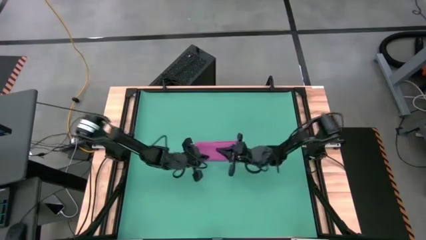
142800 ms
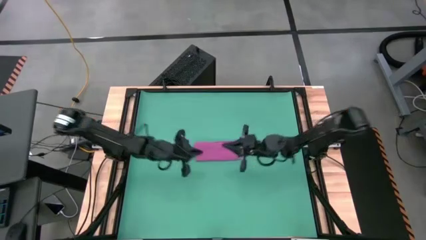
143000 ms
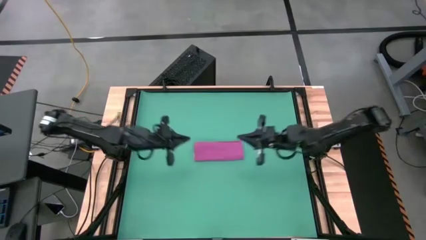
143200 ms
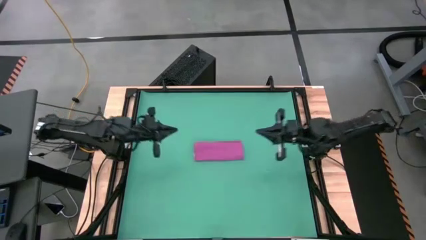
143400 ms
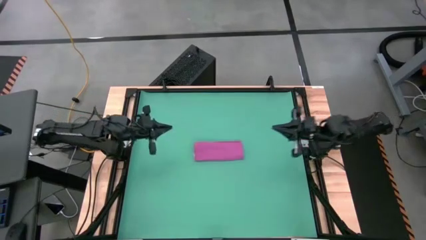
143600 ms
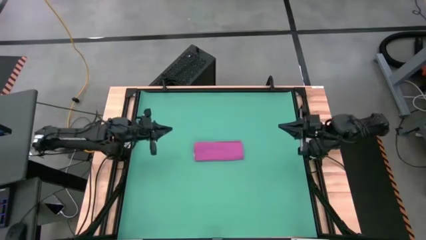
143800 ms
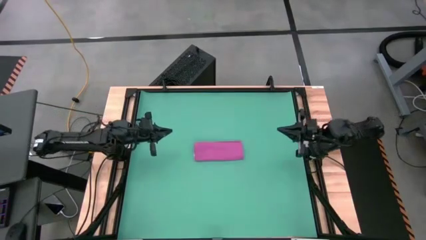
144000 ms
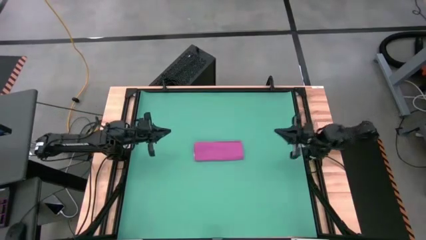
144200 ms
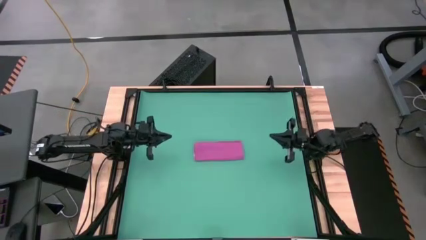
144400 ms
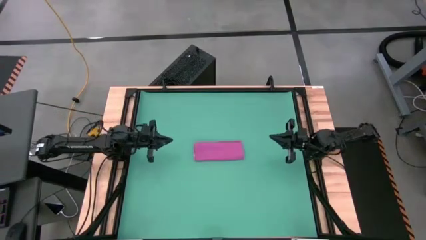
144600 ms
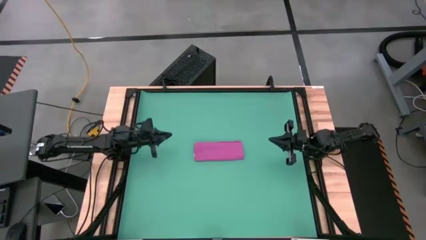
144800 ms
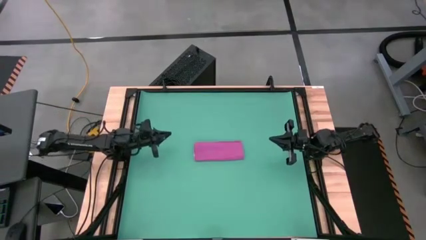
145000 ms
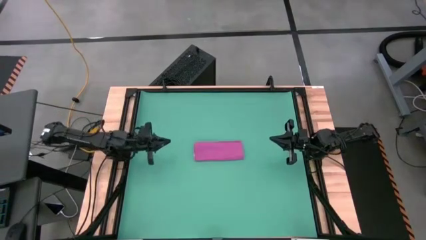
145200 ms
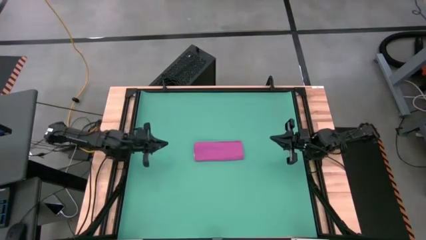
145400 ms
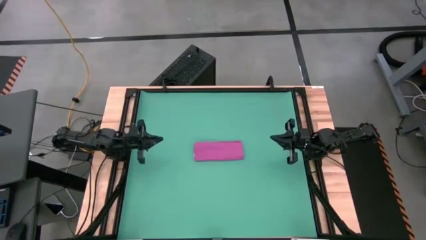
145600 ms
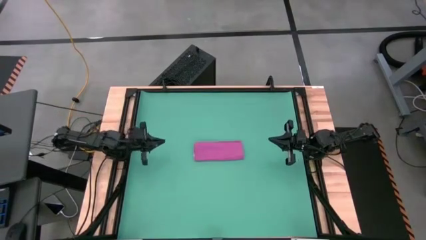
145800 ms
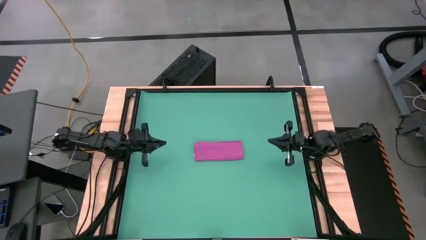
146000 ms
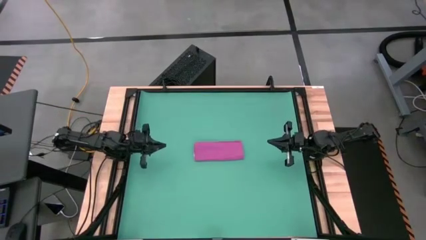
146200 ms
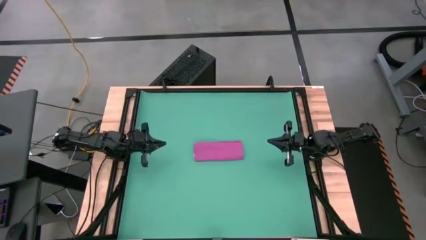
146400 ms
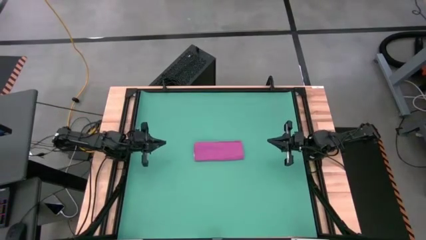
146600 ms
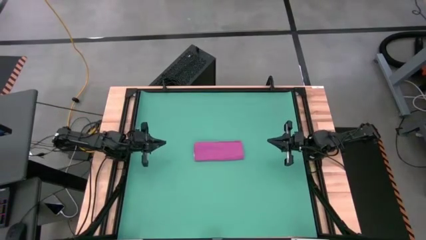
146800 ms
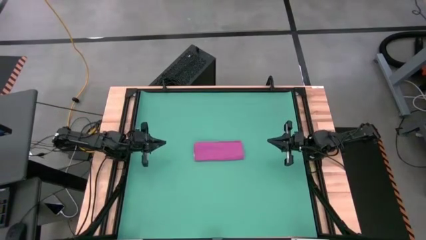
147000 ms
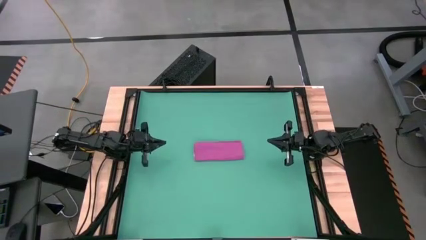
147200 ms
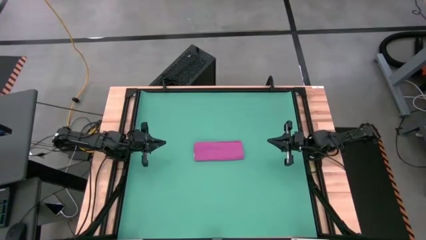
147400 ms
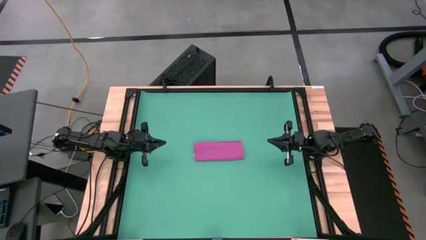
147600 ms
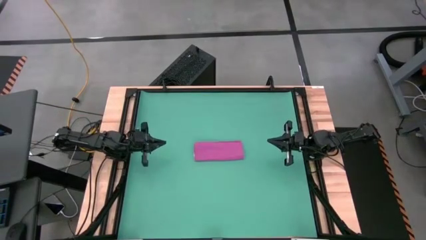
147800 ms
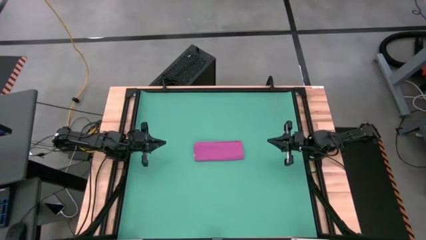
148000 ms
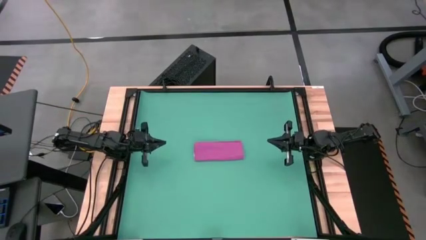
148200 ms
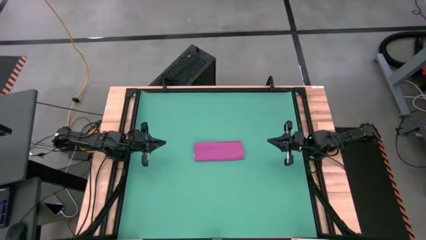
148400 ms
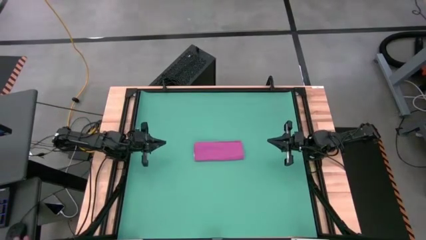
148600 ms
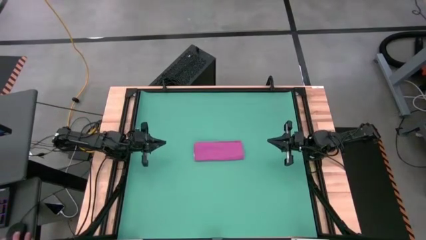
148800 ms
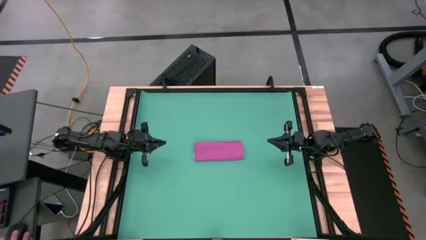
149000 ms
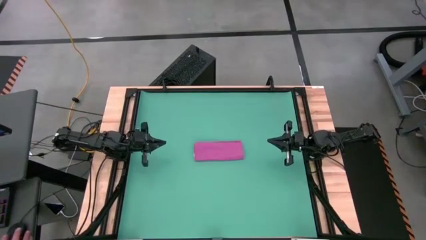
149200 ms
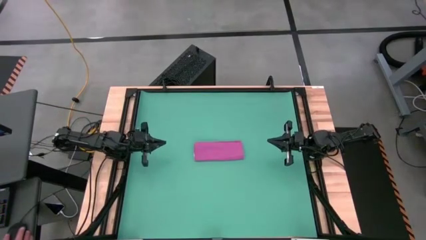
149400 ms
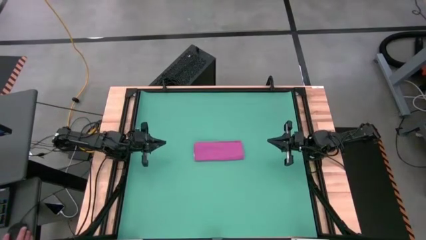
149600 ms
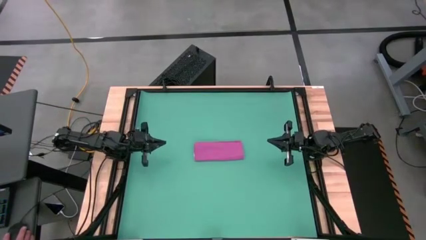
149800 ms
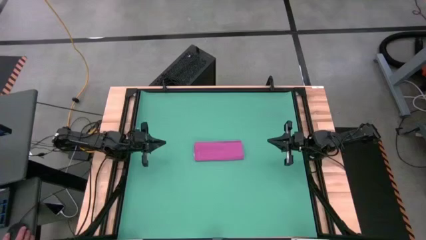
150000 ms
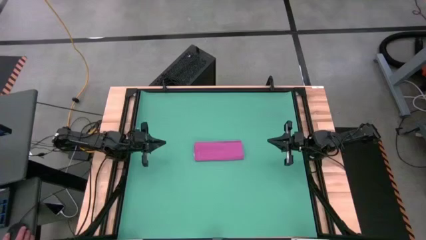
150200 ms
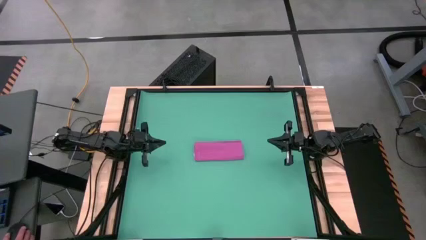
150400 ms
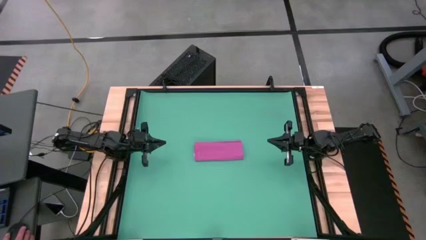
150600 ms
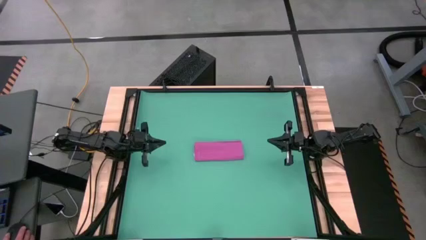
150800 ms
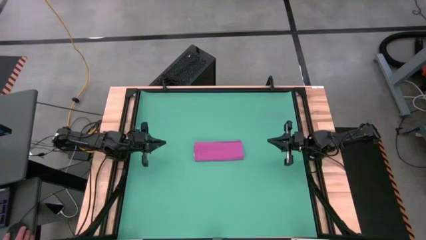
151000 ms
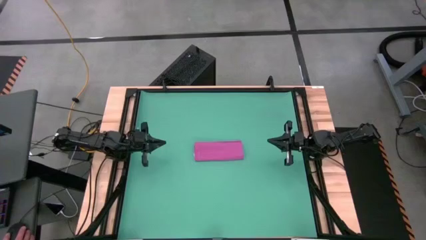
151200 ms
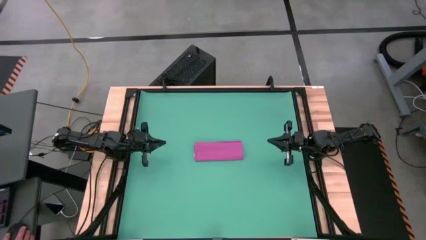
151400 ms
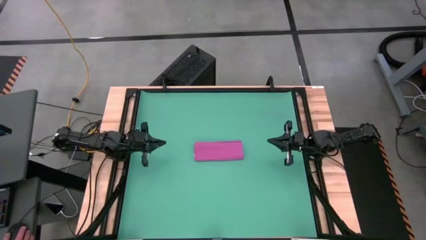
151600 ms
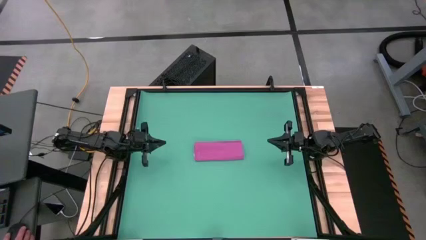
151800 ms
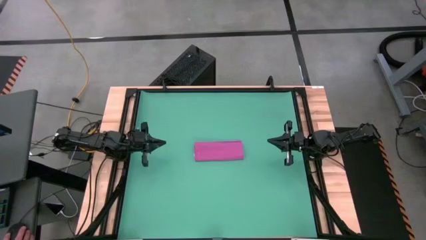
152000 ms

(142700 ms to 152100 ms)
Task: Roll towel
Return to Home Position

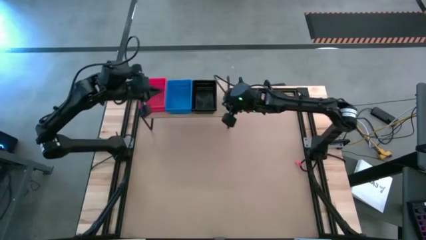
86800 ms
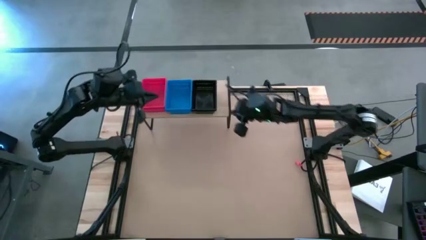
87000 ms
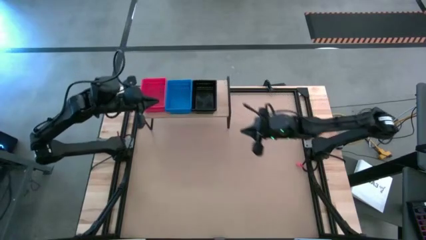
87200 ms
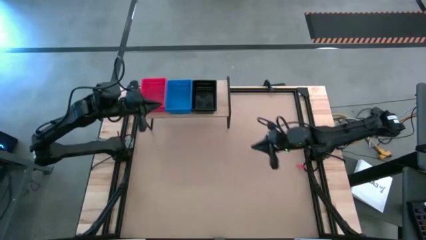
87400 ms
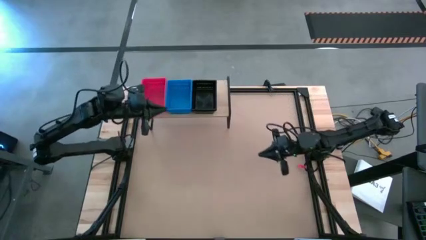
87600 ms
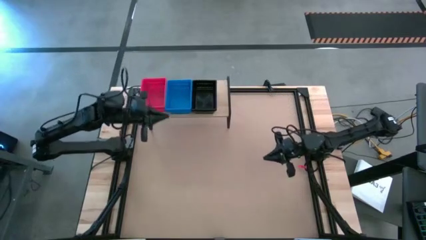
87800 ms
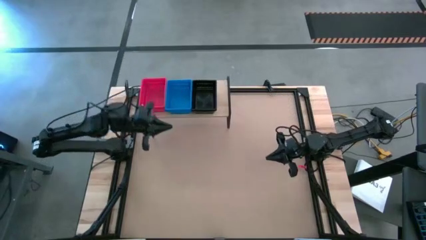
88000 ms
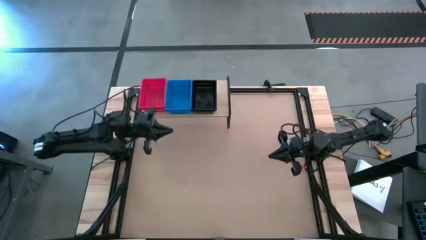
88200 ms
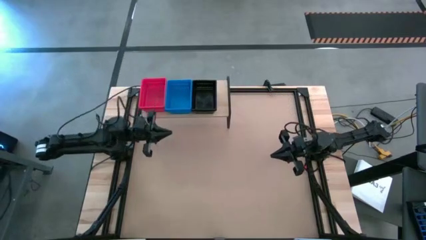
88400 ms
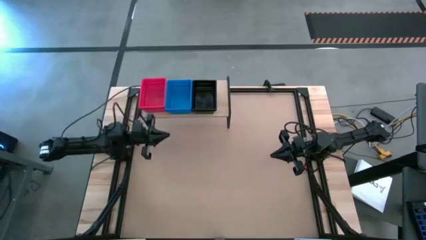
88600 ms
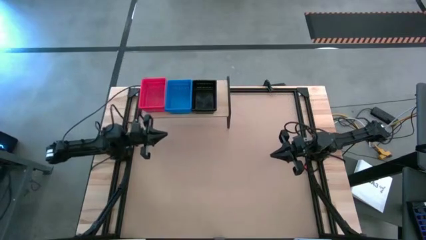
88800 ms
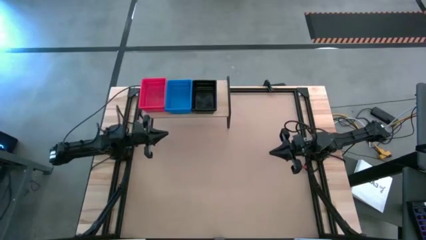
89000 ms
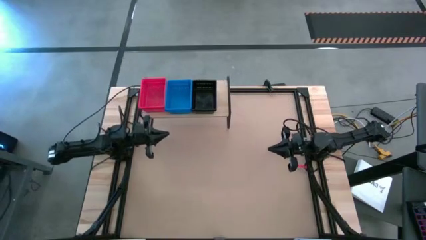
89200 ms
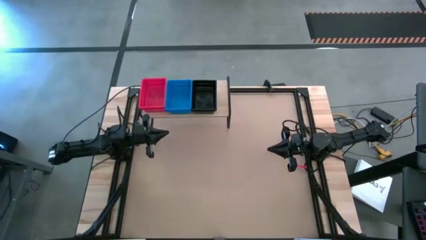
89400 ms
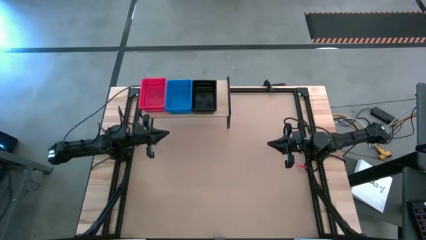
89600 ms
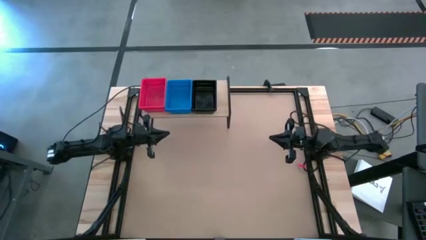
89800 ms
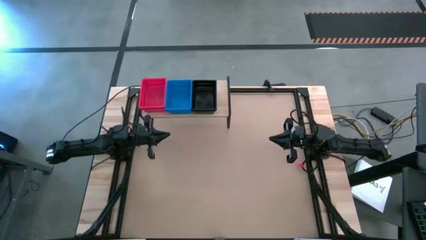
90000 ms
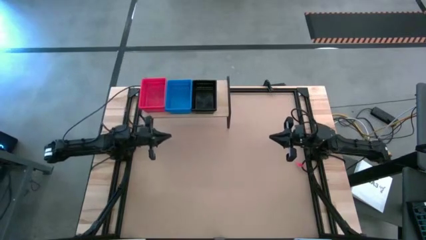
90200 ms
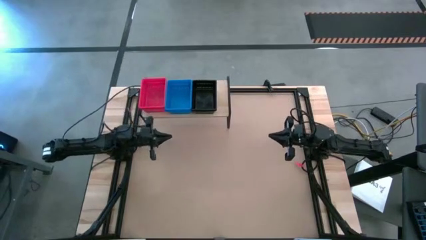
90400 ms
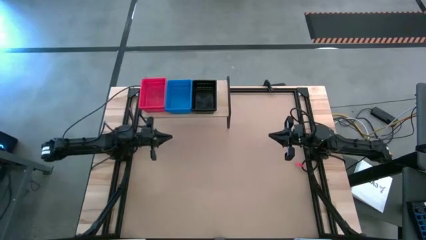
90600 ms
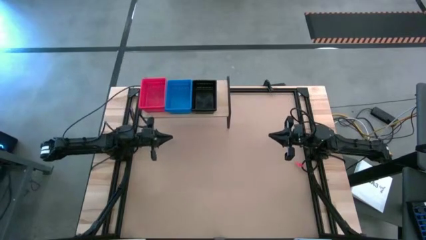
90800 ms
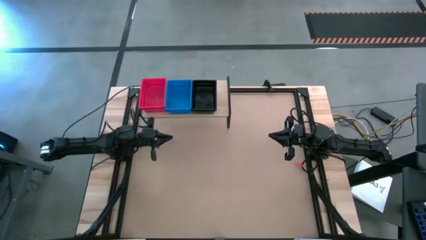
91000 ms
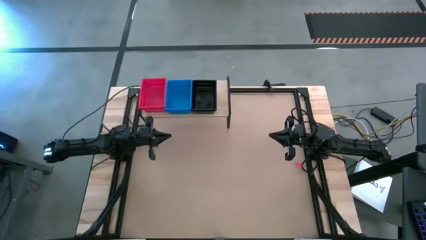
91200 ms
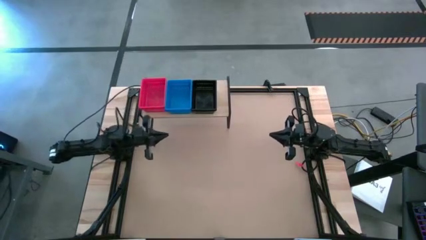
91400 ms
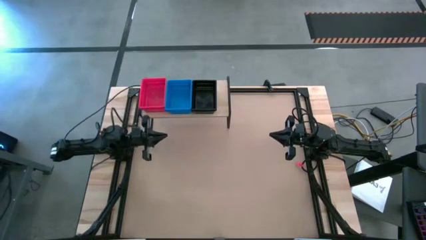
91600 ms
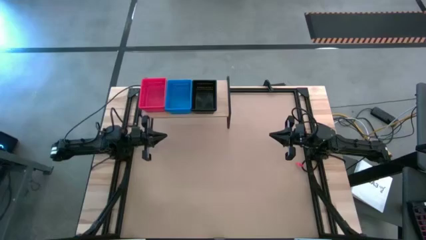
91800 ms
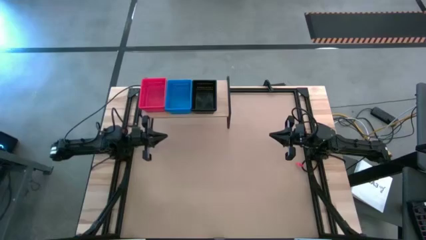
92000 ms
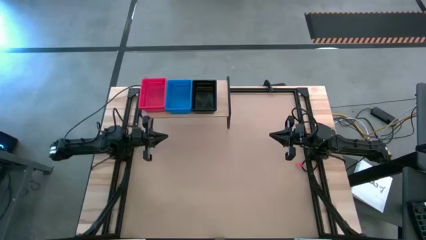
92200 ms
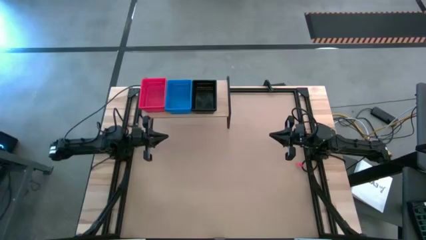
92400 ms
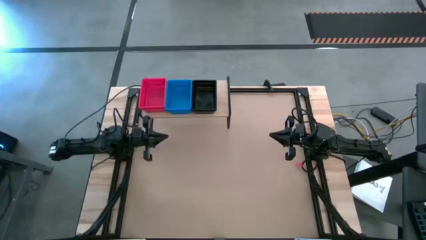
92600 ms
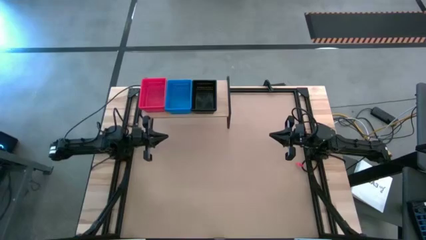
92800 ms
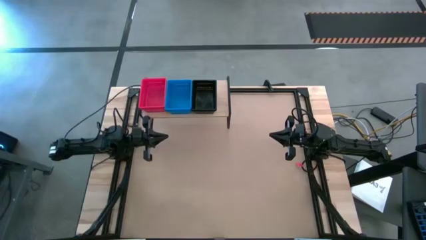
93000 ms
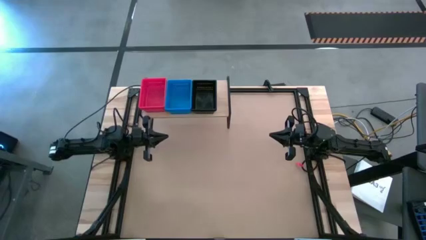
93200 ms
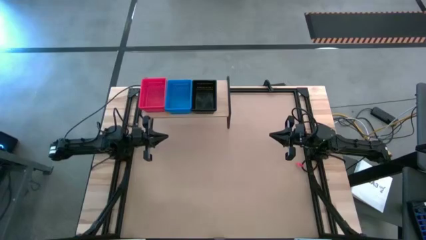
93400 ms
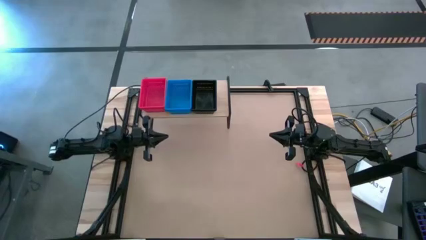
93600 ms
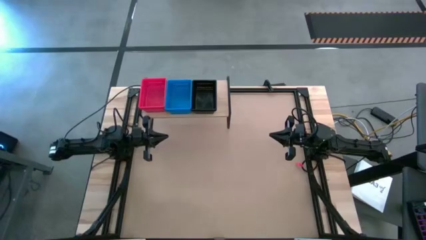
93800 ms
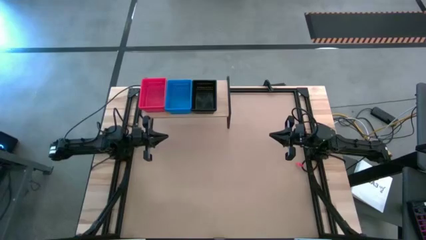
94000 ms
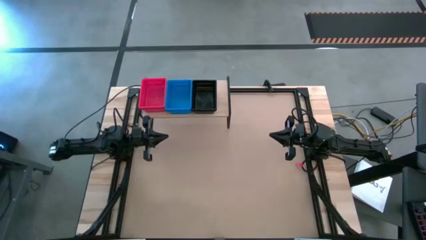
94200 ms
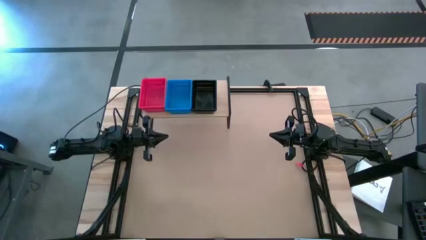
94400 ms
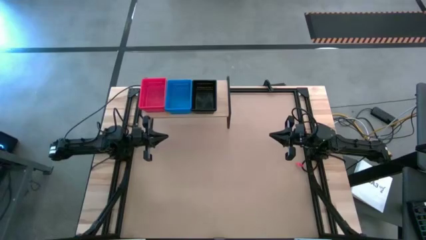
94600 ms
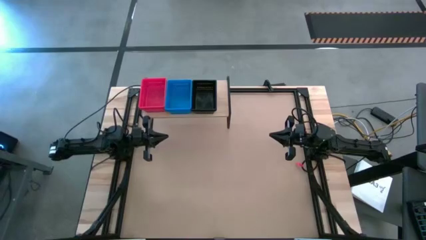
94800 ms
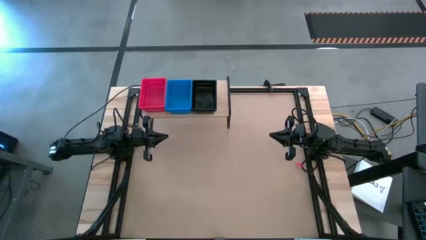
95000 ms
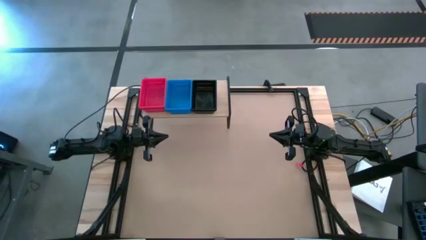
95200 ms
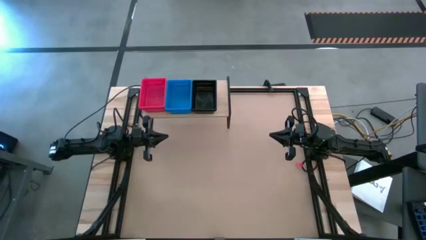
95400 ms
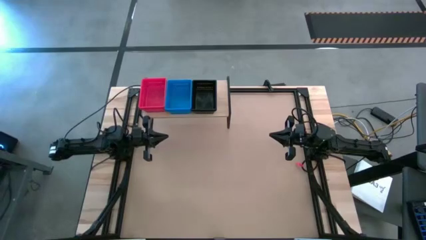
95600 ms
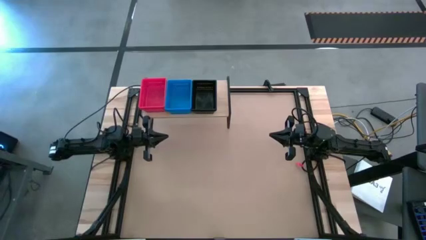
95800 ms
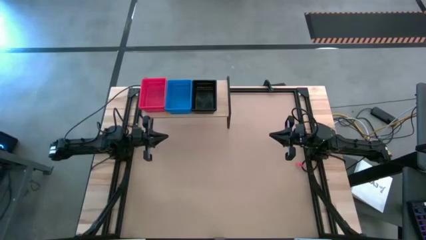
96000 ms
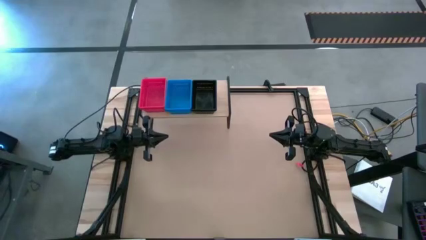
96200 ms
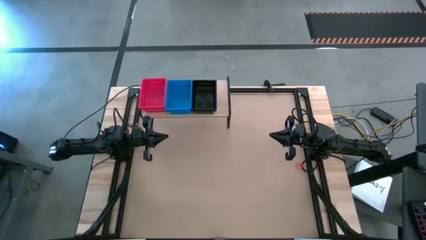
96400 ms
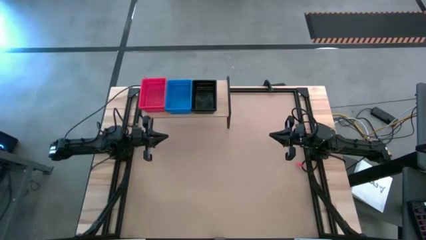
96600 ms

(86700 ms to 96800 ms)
Task: Stack baskets on shelf by color
Return to Home Position
